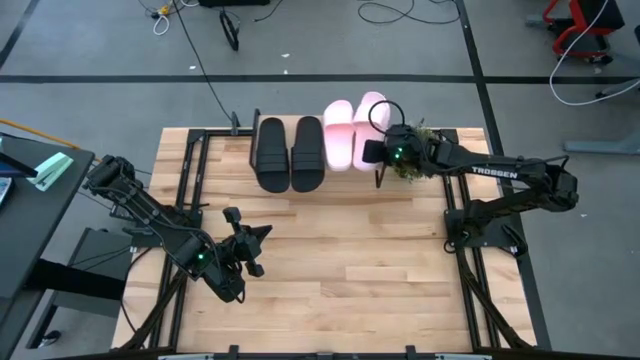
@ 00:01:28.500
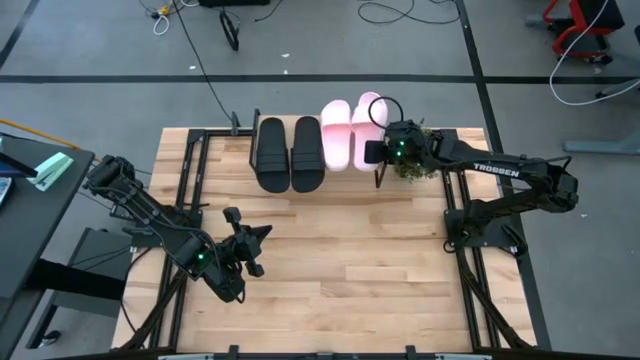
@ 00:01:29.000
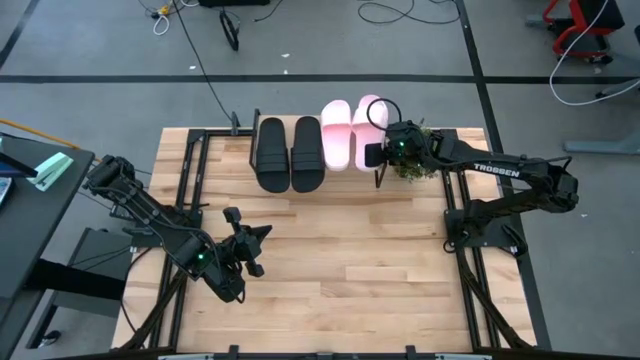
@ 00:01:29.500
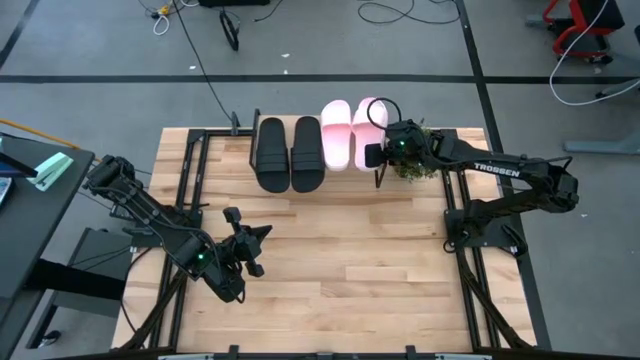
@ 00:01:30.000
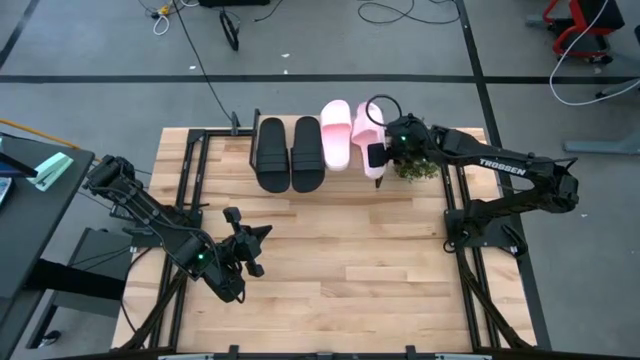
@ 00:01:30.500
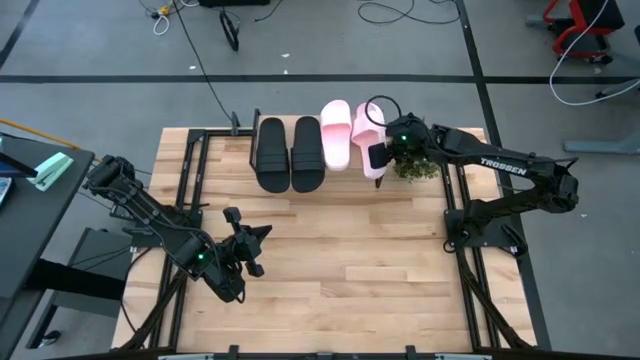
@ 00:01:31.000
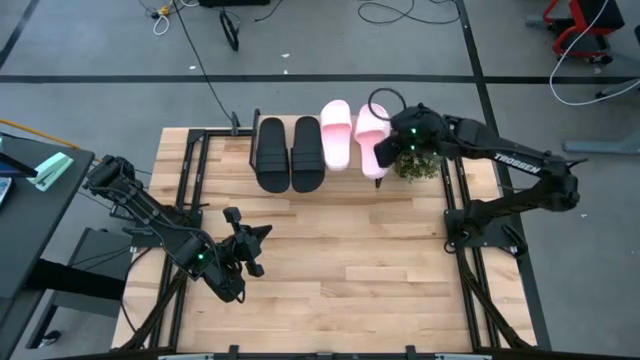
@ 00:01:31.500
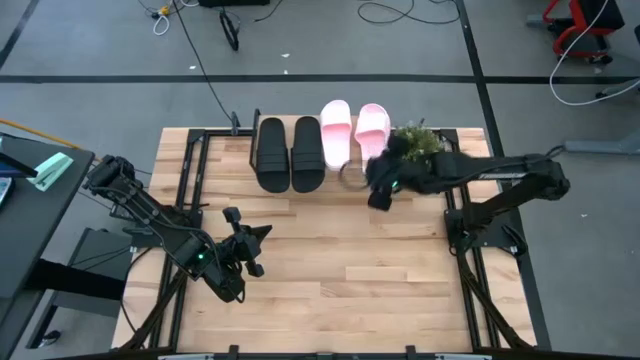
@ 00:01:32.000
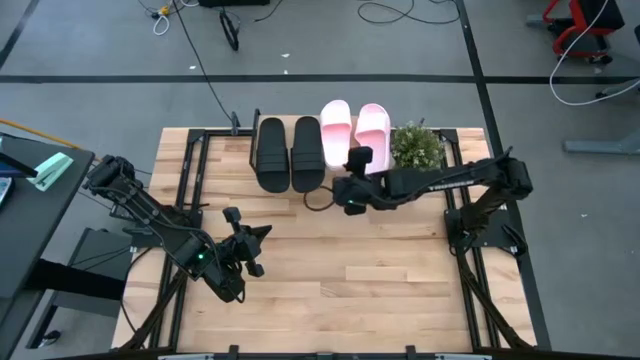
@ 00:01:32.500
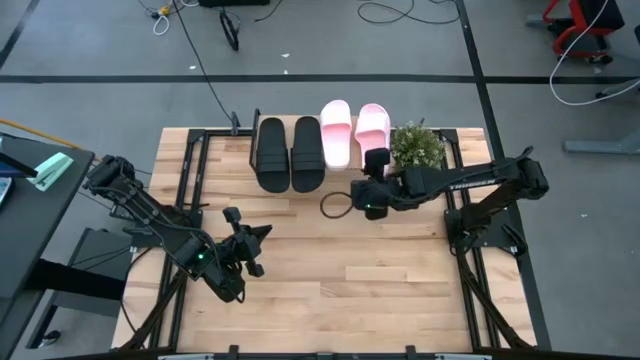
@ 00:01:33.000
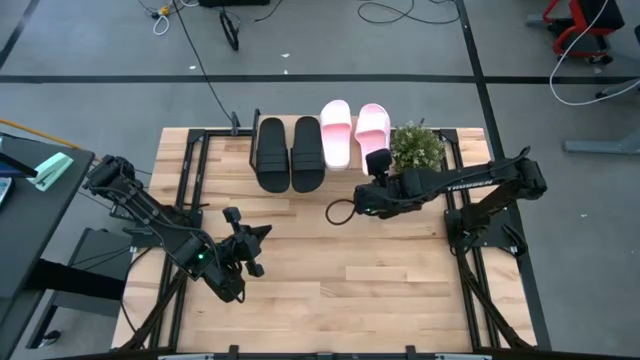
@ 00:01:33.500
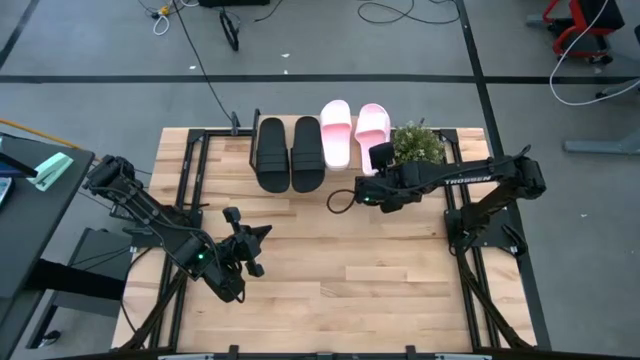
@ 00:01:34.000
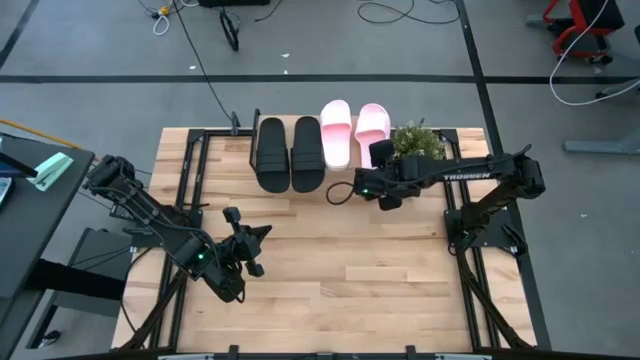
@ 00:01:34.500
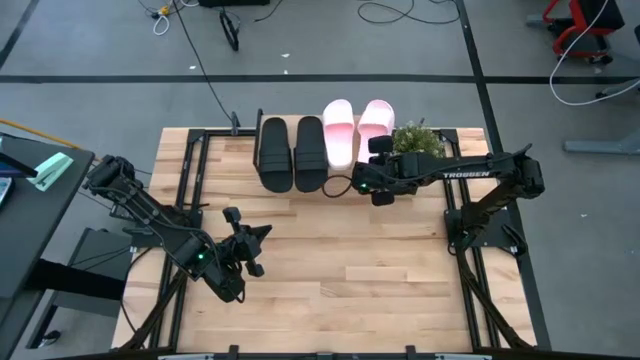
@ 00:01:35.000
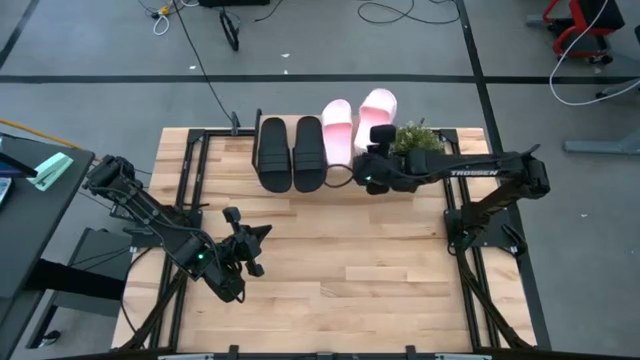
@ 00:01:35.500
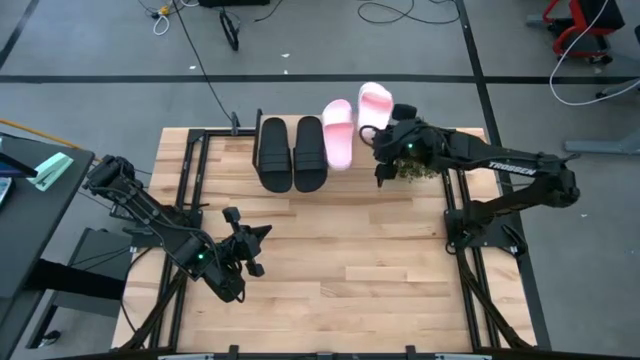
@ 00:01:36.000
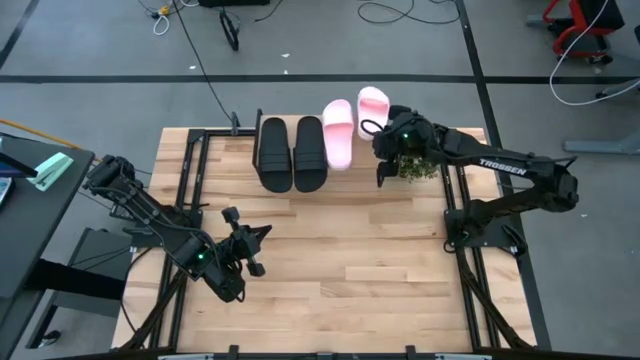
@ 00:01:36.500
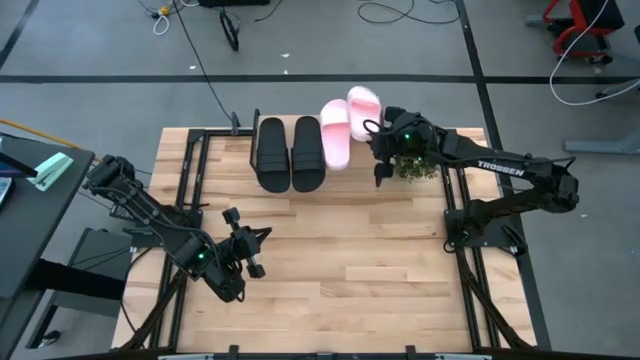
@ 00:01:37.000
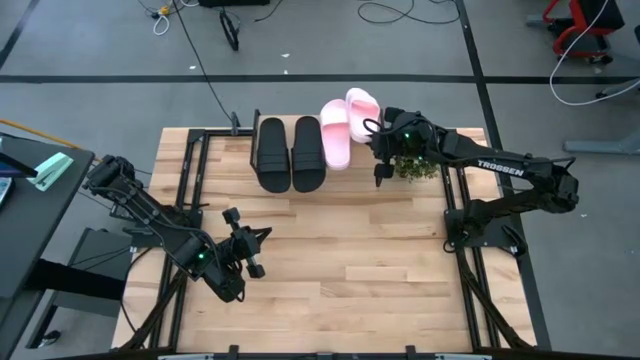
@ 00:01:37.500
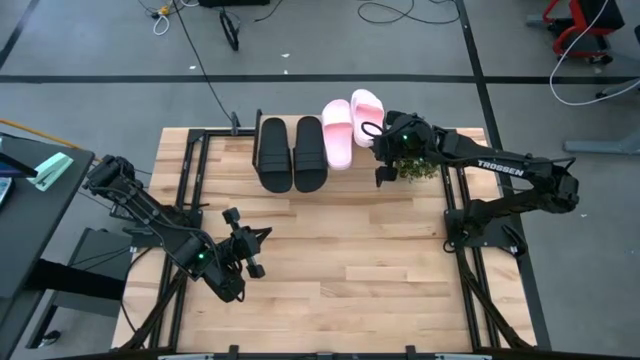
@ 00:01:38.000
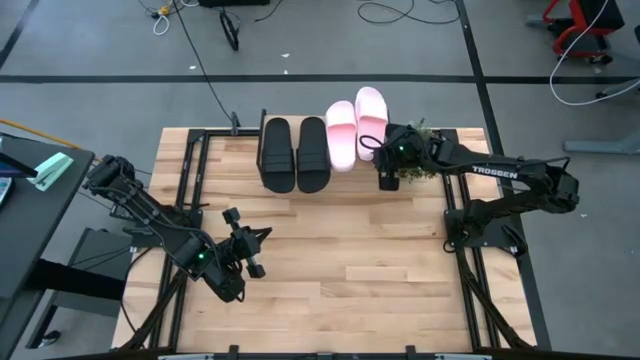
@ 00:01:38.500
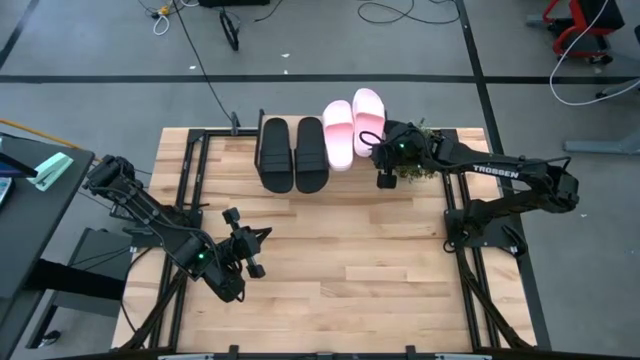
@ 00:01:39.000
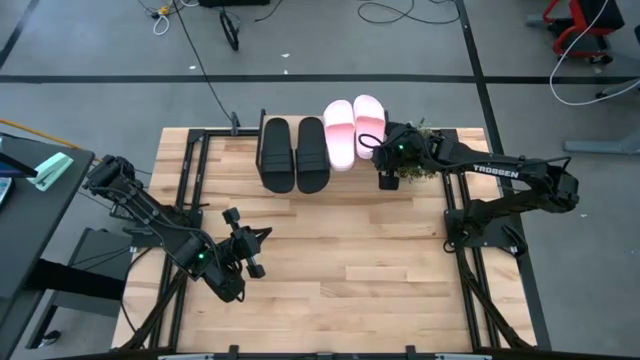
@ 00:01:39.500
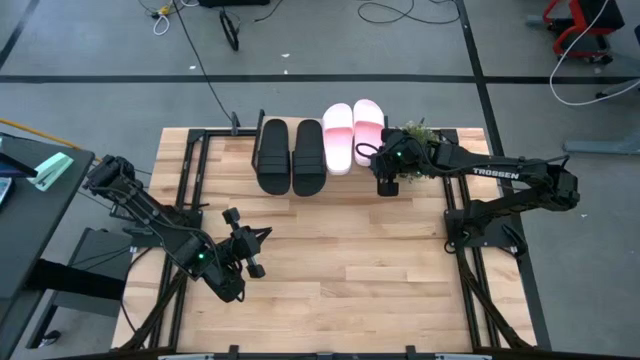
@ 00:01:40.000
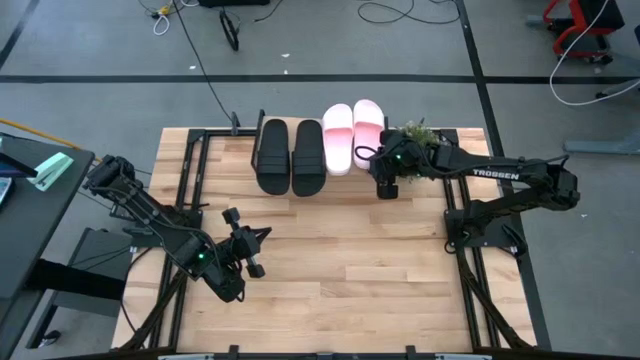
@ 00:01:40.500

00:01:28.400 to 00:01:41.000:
Task: Pick and place slides into the shelf
Put the white slide on the shelf

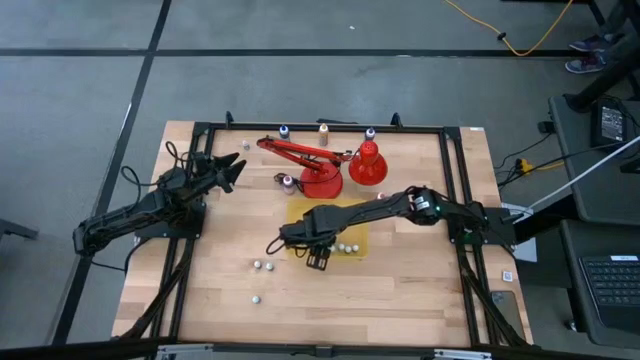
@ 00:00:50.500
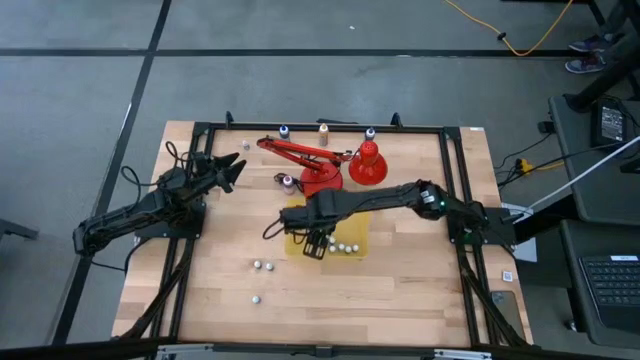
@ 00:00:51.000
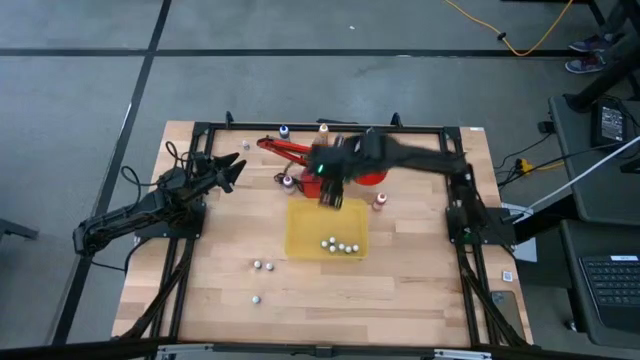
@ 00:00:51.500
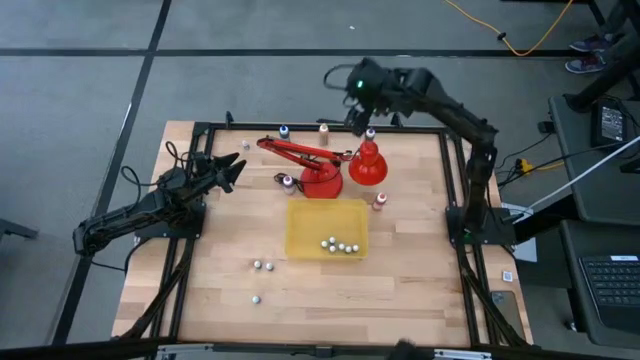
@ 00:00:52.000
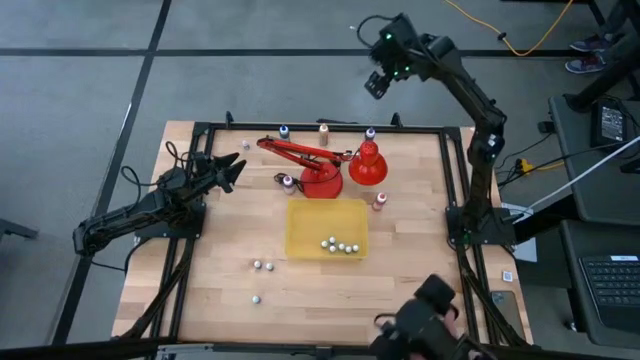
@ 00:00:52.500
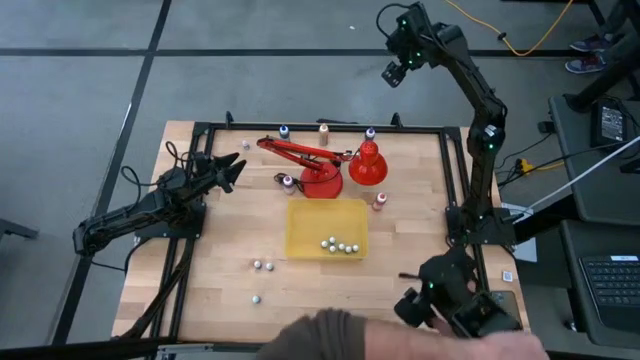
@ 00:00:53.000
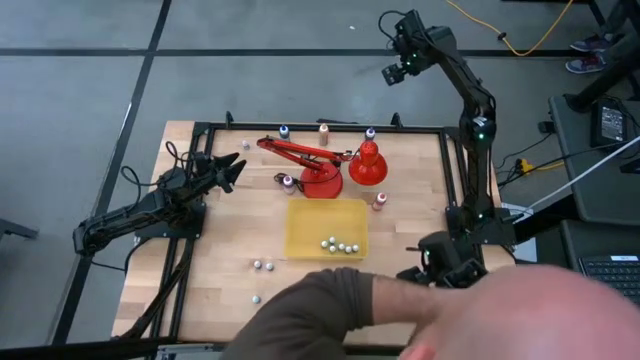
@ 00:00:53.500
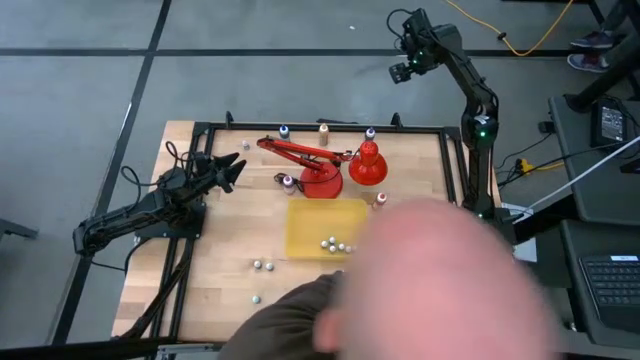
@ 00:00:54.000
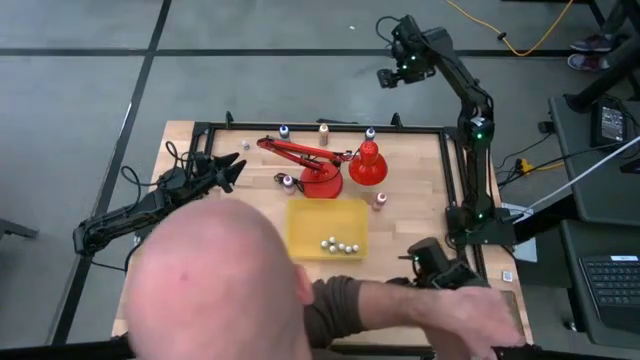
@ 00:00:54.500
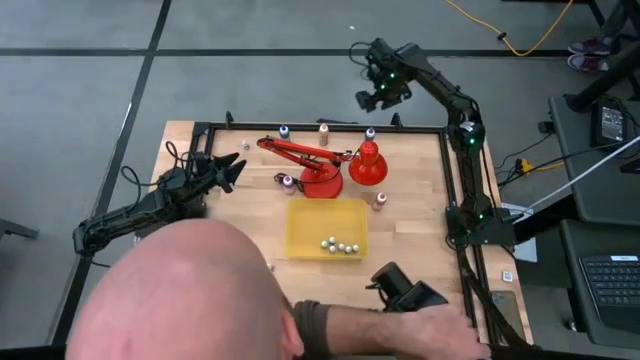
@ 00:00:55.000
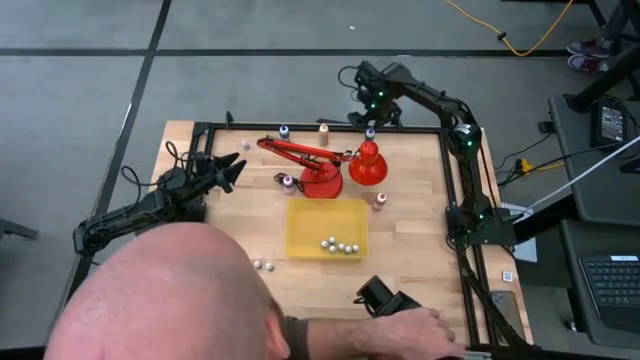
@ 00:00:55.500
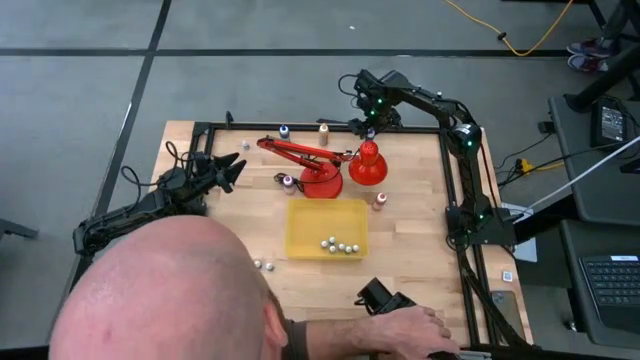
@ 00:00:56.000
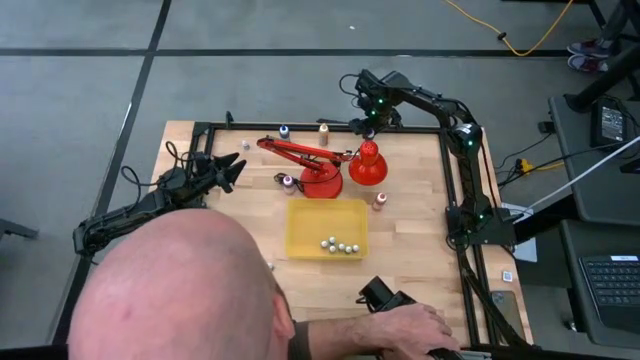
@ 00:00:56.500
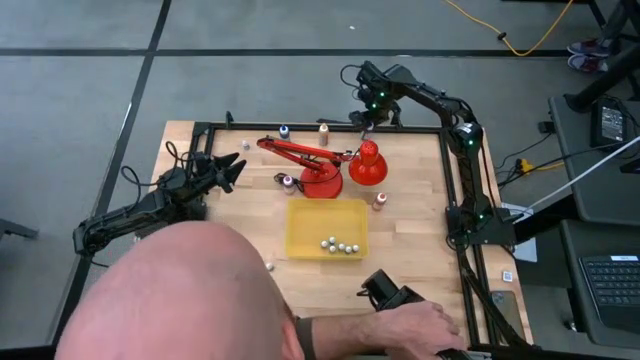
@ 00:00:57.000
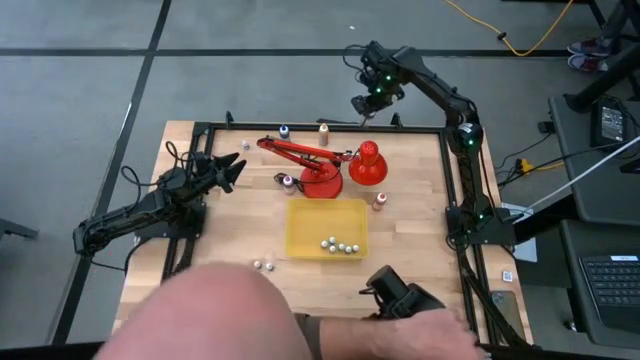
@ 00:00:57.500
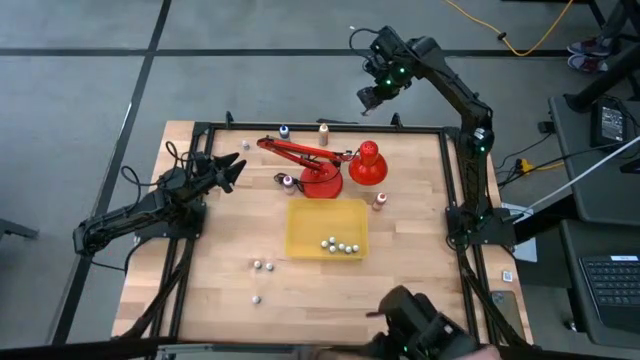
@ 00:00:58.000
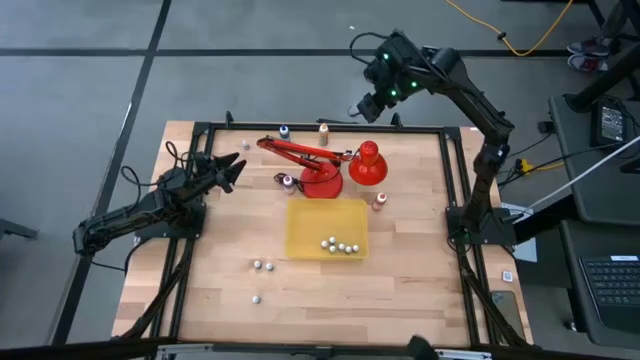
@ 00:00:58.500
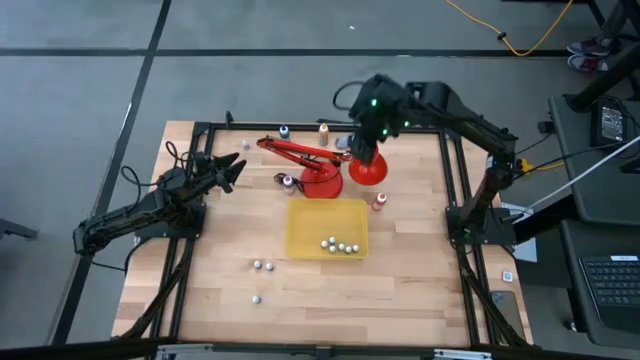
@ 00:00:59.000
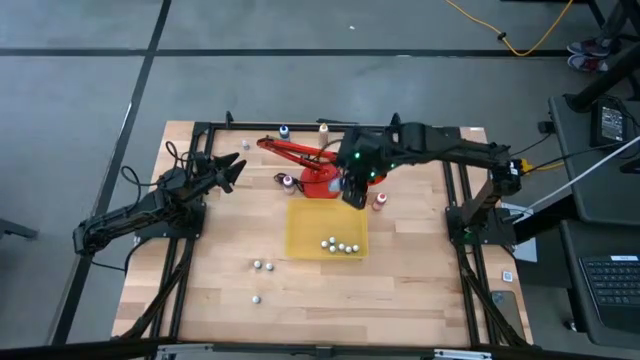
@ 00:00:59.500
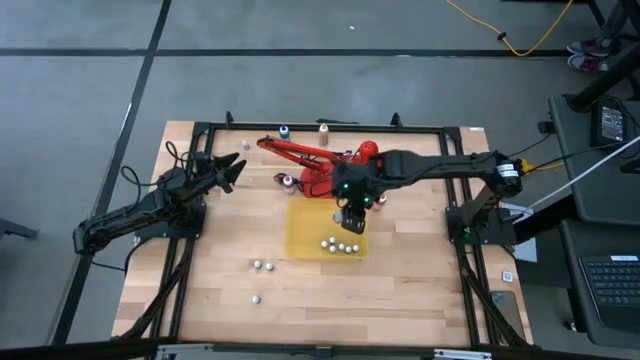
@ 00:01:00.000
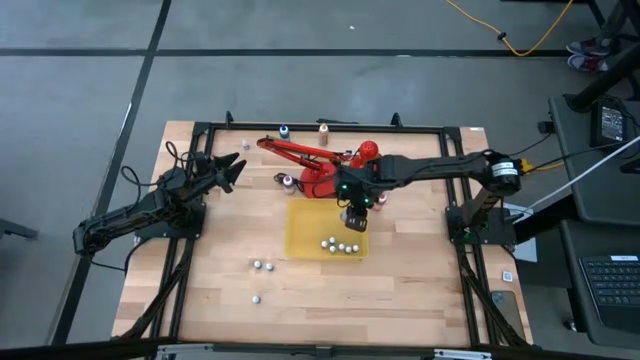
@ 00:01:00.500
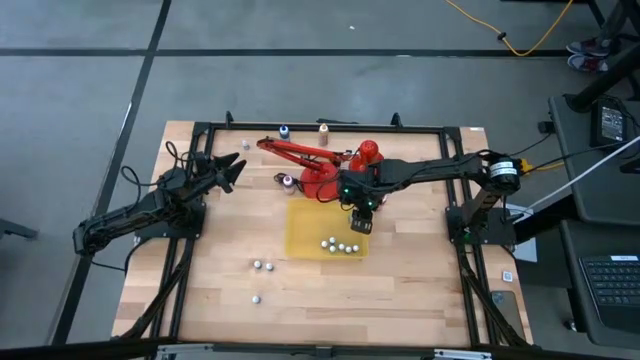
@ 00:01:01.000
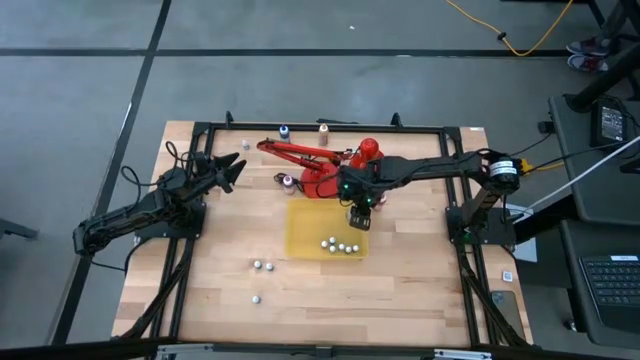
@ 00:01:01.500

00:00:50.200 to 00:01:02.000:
Task: Pick & Place food coloring
Put the big purple food bottle into the yellow bin
